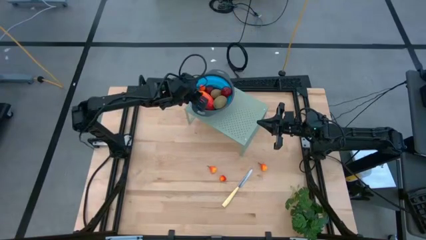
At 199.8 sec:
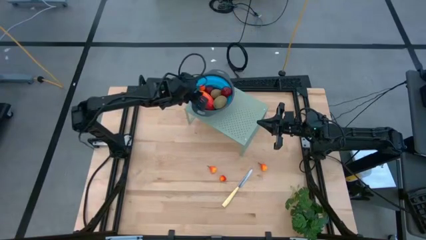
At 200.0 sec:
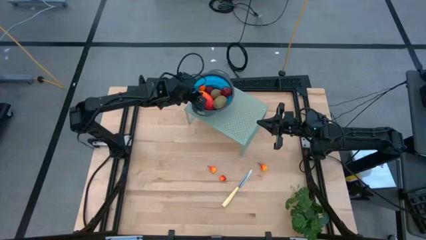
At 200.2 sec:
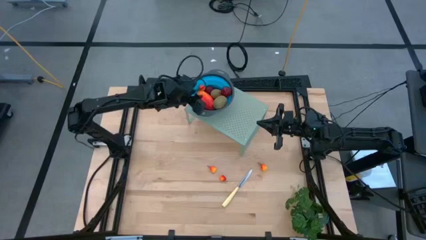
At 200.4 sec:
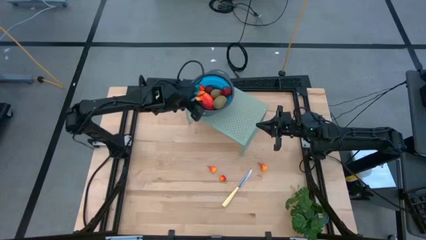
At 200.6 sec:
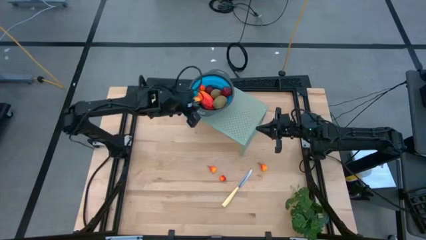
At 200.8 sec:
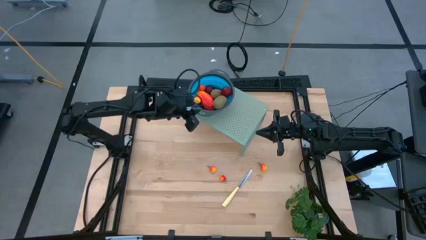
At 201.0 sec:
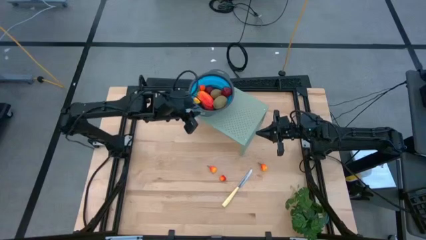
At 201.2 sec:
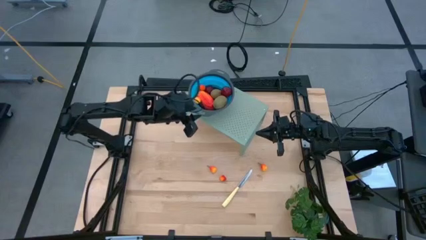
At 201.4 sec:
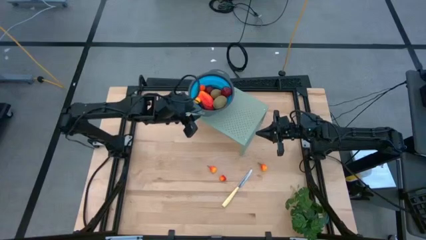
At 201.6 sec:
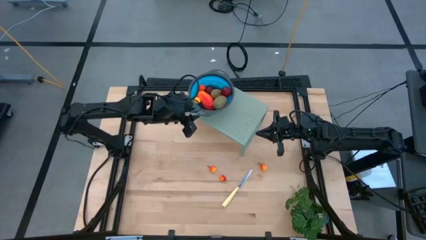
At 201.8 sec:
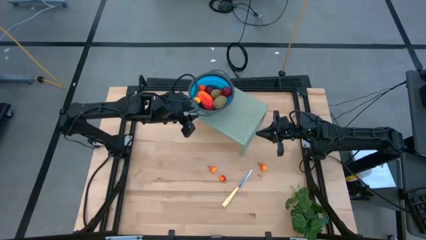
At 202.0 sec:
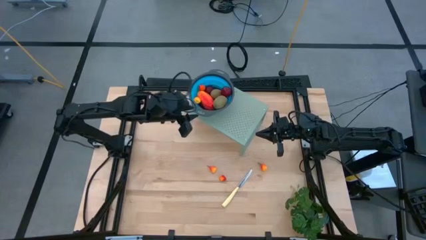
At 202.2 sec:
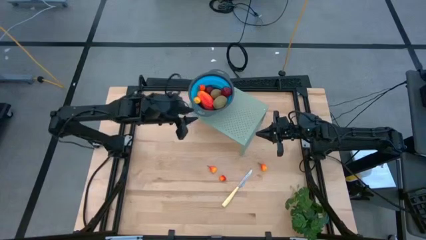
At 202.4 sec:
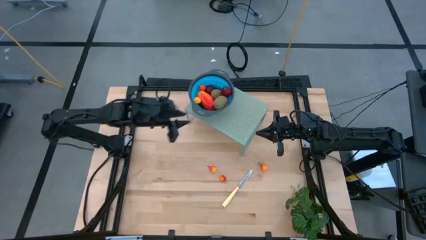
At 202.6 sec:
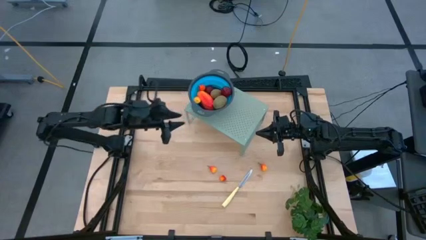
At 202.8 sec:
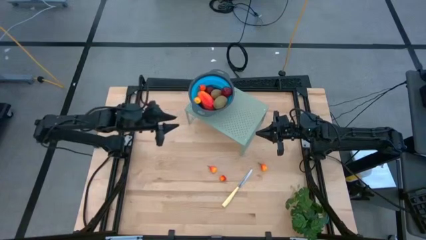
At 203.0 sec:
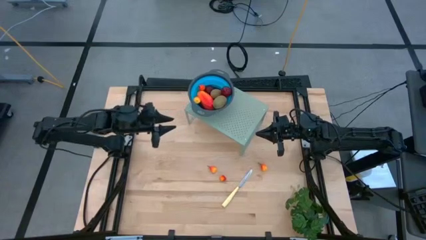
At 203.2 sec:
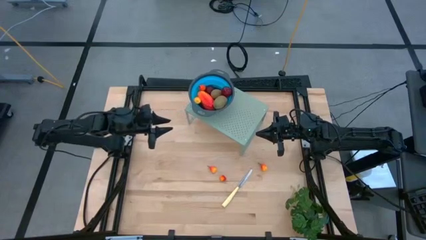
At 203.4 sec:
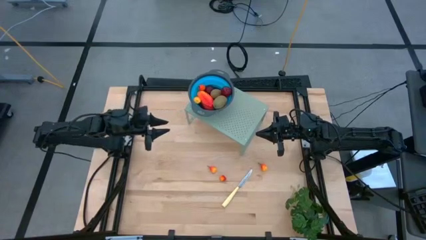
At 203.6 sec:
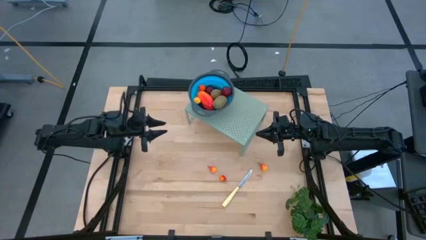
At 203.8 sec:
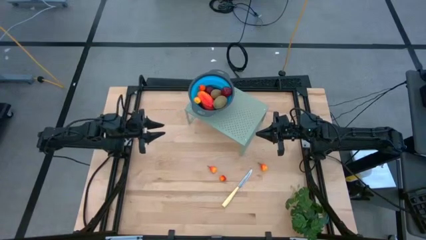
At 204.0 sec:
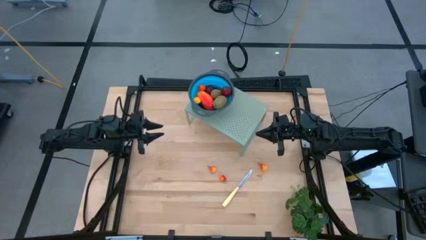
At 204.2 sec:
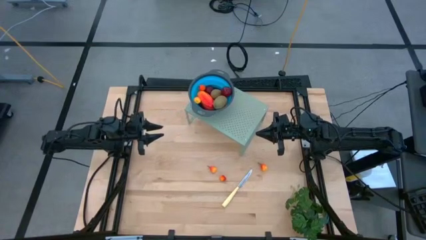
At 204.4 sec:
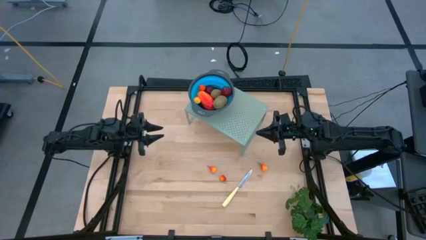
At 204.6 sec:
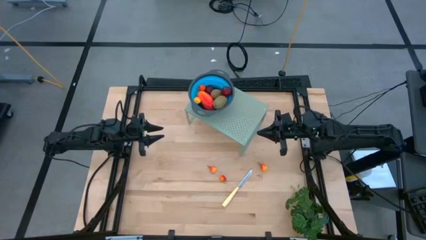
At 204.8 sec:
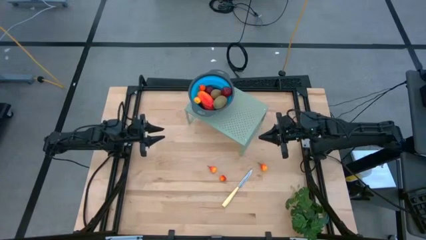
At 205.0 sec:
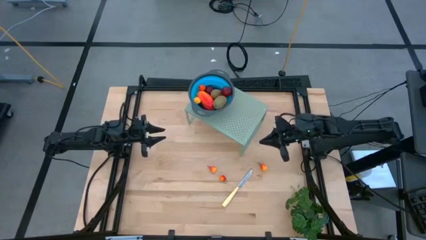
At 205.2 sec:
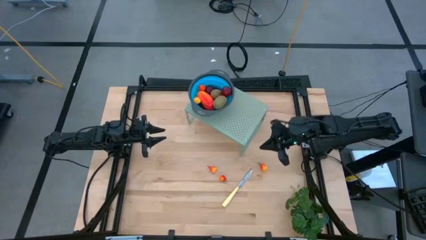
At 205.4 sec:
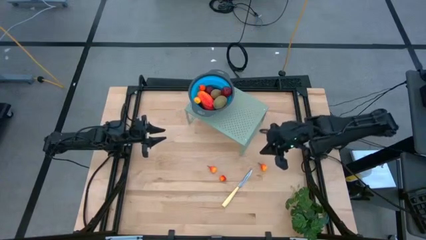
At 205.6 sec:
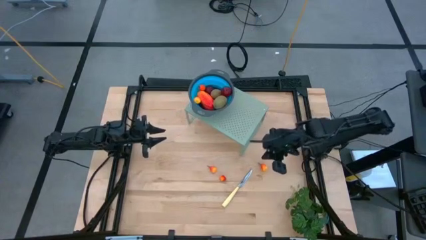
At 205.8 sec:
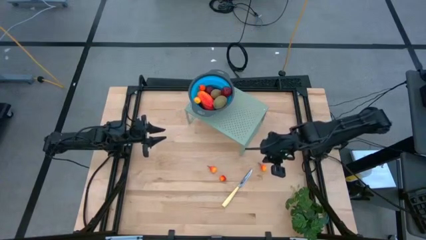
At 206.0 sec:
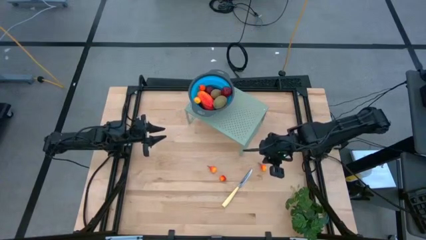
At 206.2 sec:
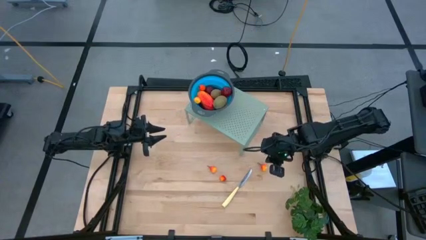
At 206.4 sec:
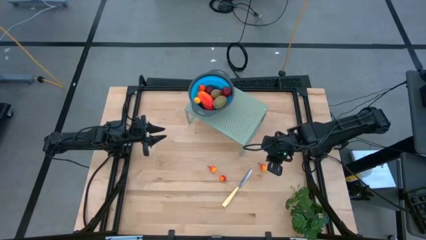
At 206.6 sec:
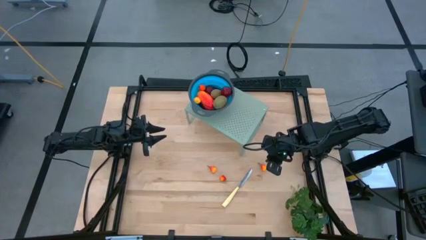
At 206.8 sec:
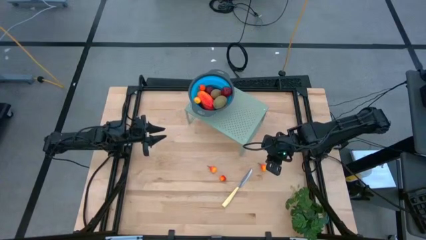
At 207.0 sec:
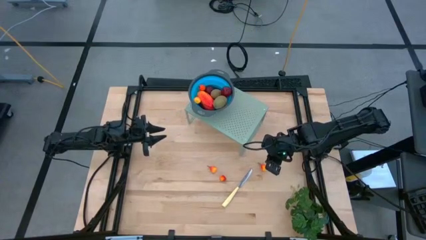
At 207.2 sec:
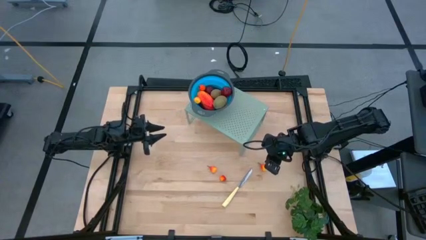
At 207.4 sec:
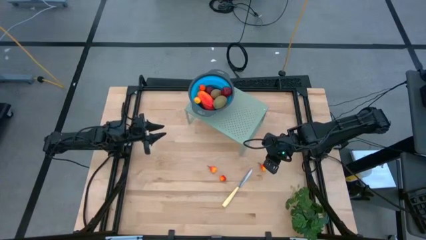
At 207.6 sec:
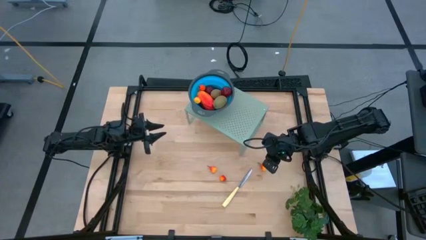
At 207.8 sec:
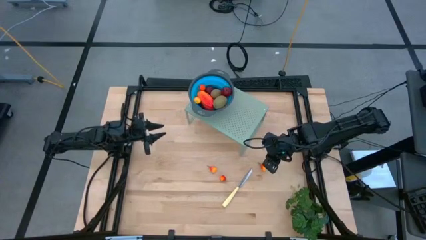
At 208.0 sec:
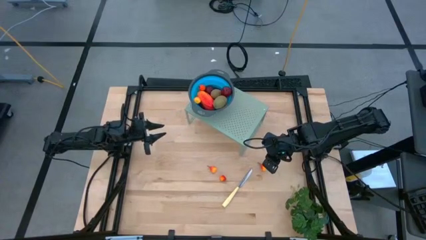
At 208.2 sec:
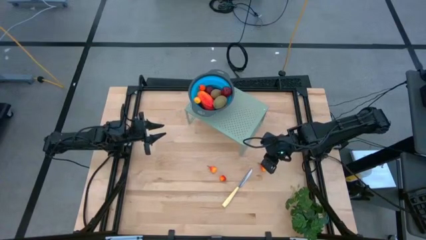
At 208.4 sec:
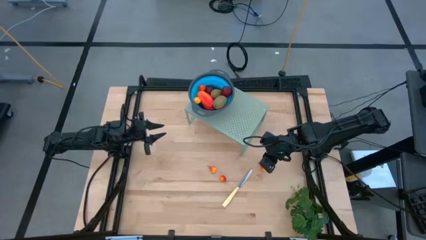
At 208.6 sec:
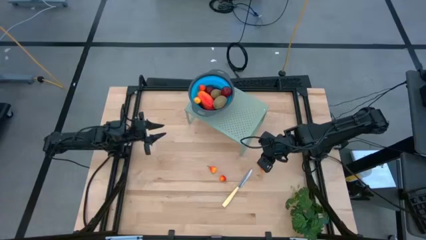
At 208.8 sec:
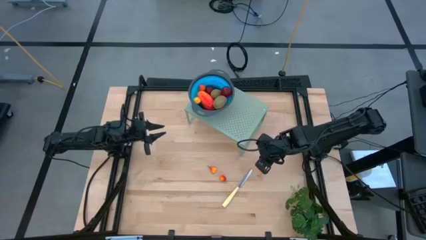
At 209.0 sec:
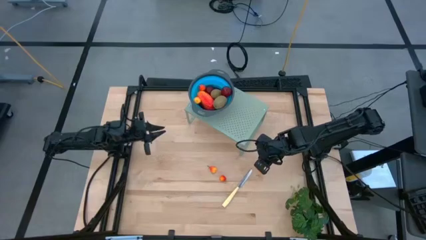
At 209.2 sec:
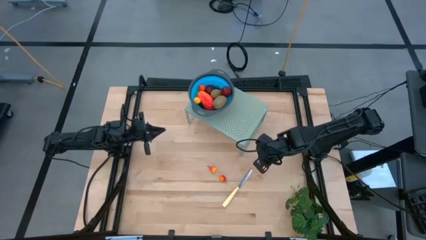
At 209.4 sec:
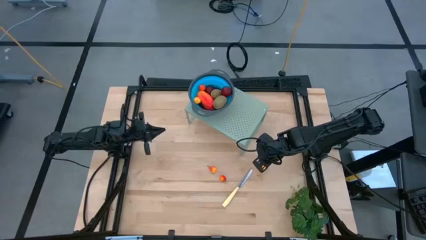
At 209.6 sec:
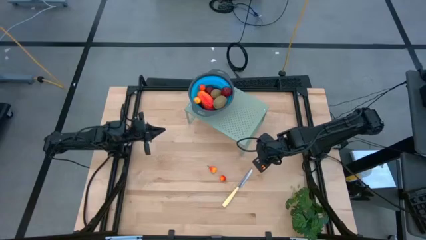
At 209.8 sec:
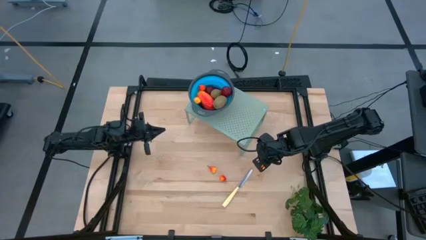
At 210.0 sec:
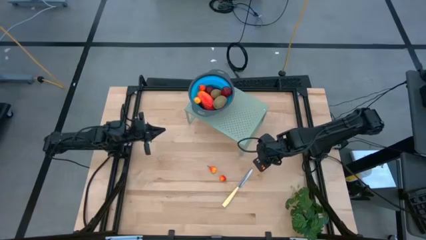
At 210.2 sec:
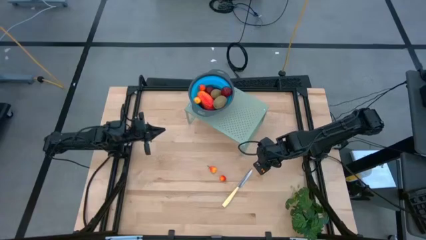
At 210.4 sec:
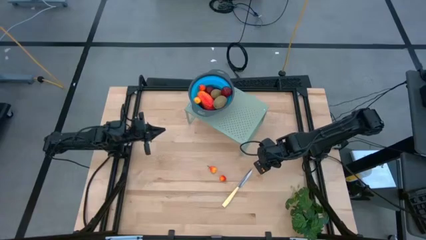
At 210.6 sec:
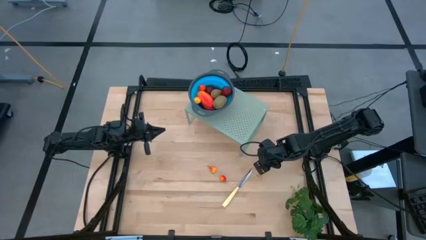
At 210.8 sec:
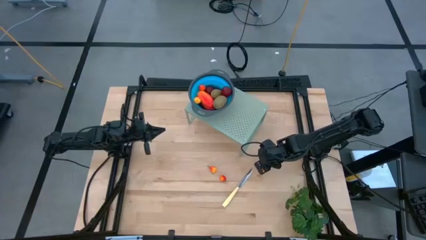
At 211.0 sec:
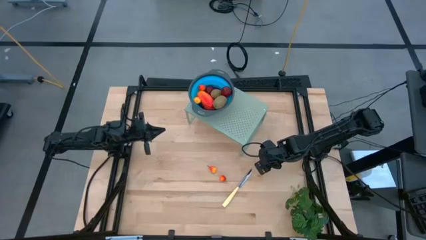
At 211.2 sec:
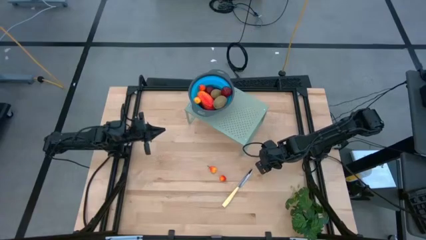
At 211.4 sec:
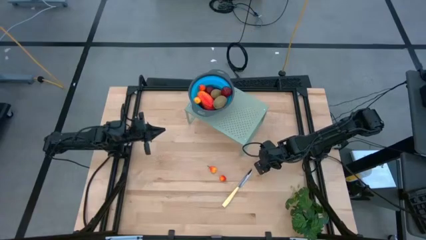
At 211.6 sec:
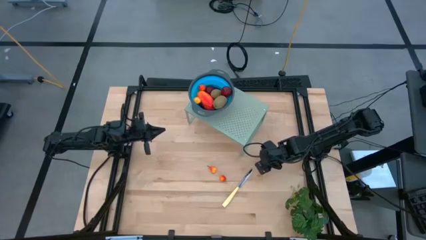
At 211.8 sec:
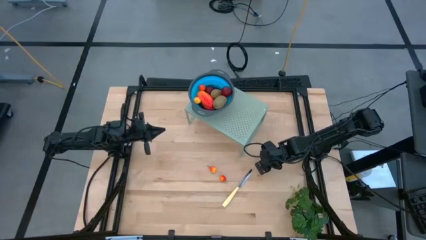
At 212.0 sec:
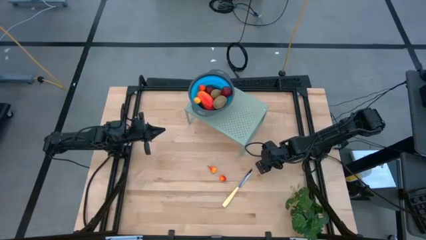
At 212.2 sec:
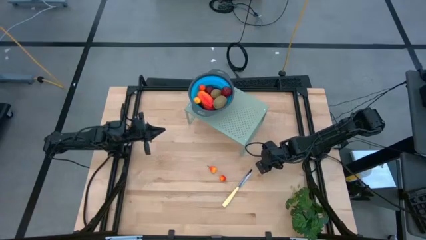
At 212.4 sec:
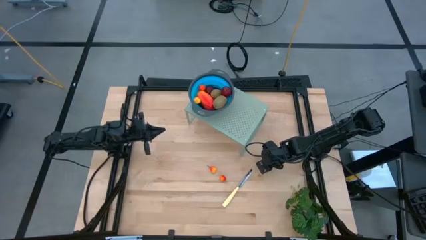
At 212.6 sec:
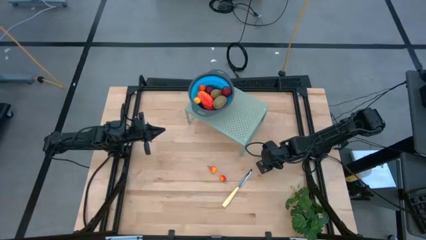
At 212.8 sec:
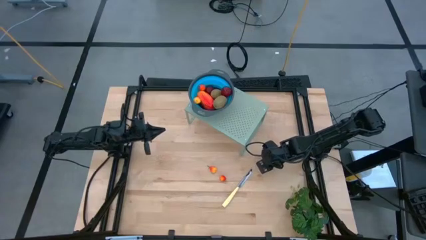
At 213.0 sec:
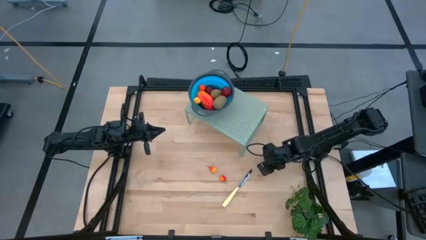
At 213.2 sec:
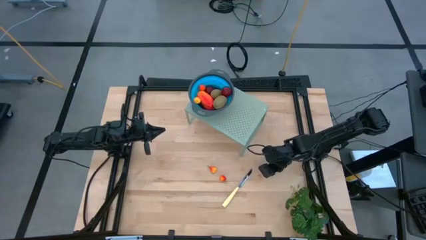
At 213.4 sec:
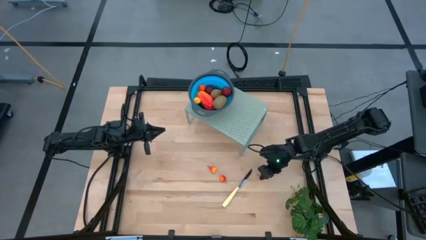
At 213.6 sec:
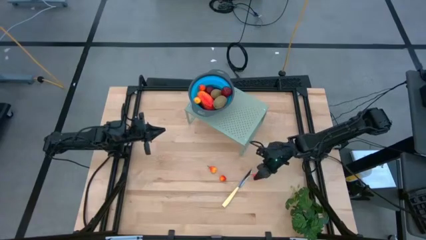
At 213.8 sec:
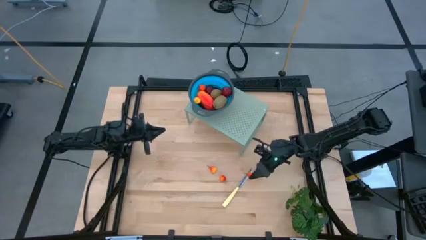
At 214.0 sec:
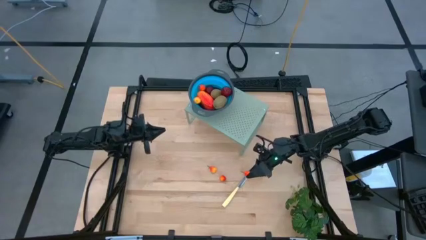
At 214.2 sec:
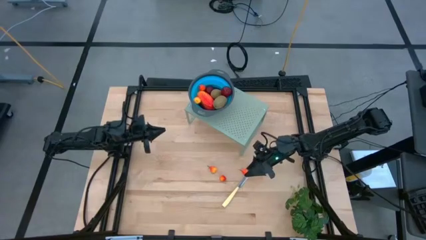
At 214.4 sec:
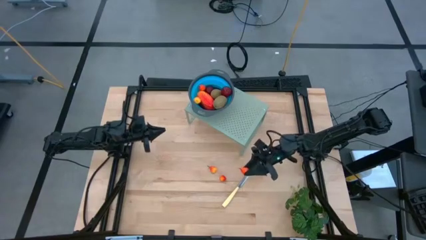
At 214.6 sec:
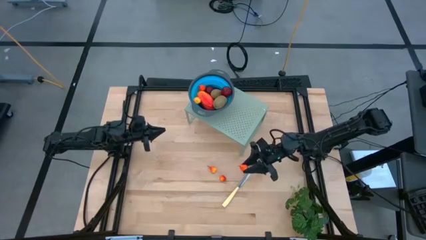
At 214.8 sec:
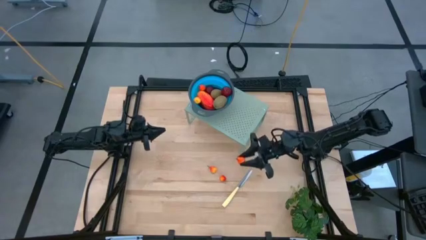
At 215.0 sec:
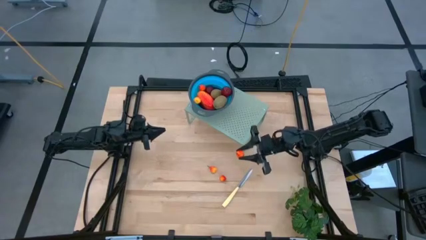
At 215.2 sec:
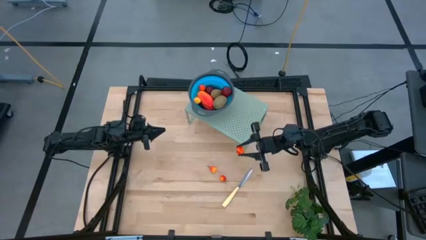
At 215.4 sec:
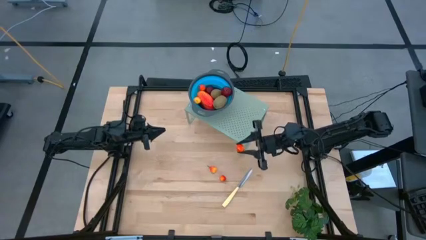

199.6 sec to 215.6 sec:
Task: Pick & Place Fruit
Put the peach into the blue strainer bowl on the shelf
